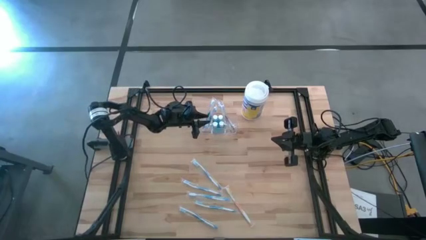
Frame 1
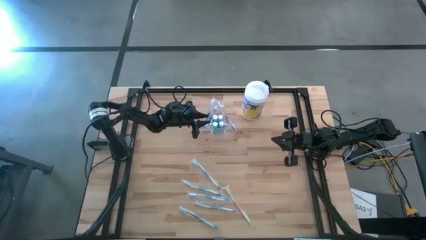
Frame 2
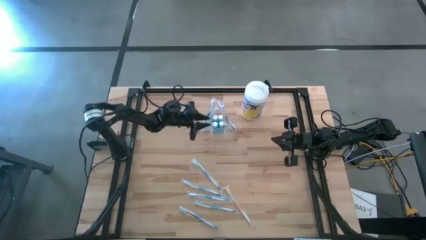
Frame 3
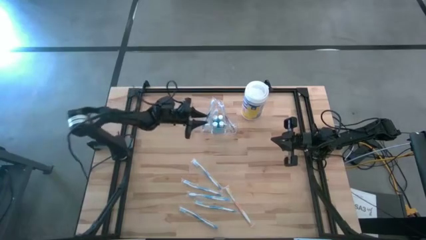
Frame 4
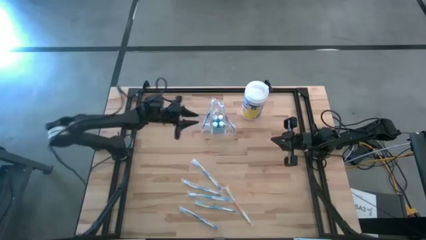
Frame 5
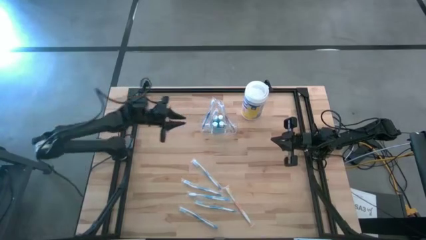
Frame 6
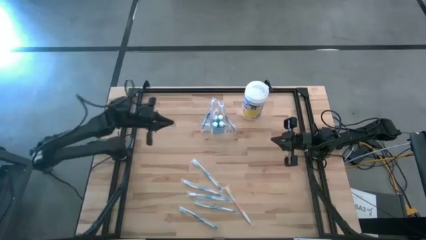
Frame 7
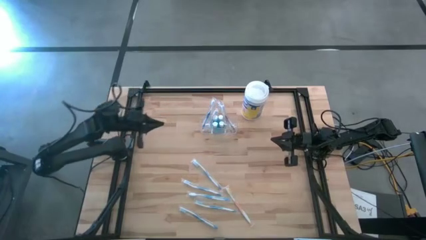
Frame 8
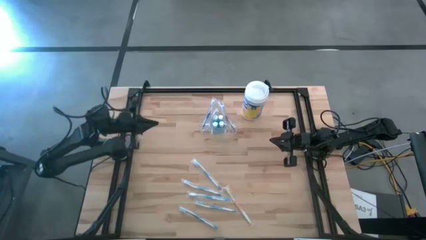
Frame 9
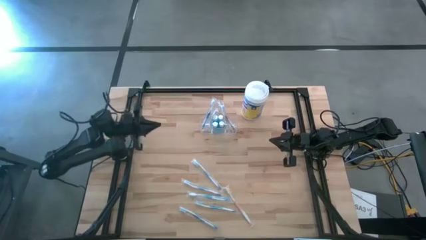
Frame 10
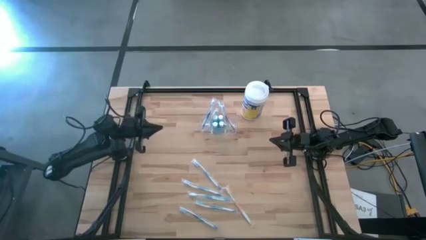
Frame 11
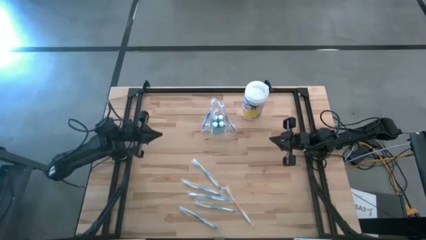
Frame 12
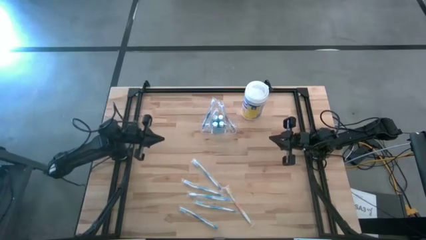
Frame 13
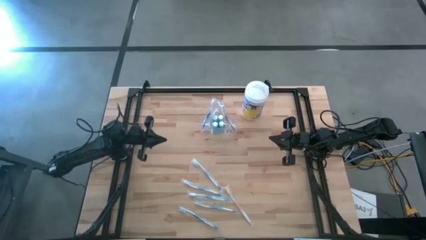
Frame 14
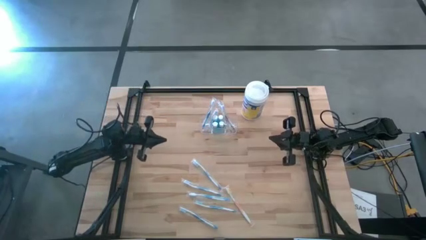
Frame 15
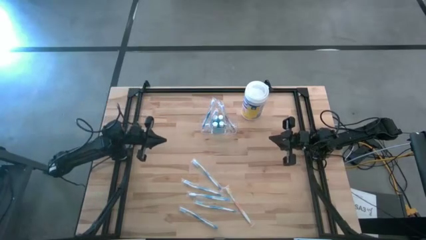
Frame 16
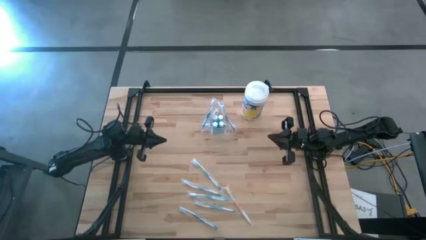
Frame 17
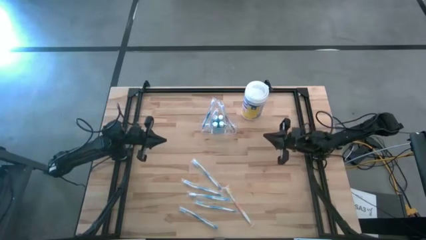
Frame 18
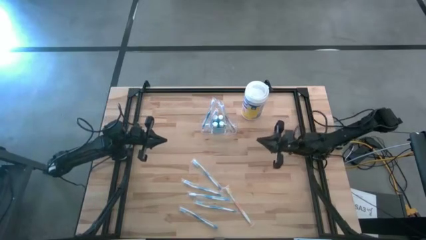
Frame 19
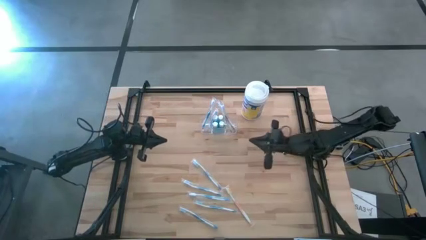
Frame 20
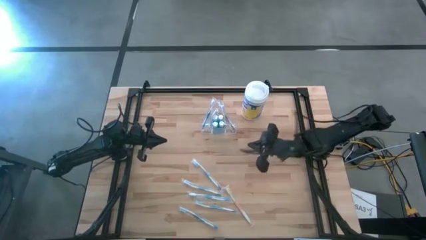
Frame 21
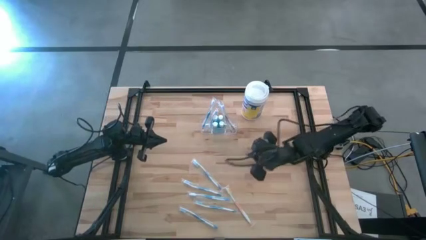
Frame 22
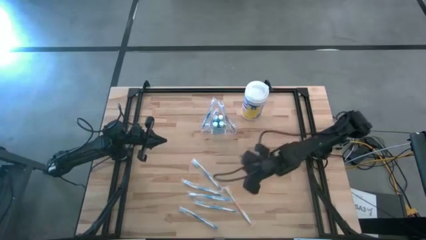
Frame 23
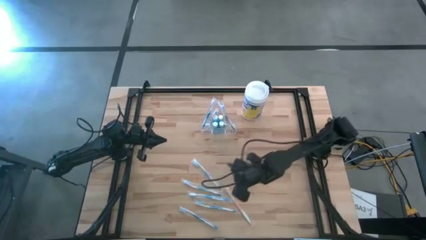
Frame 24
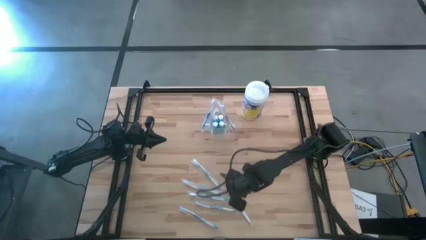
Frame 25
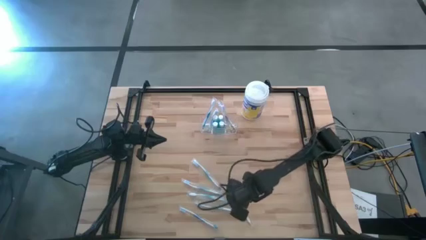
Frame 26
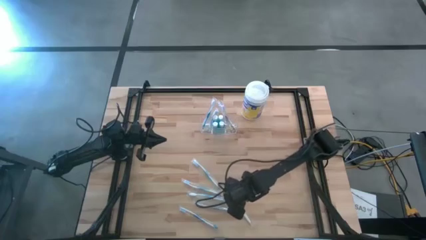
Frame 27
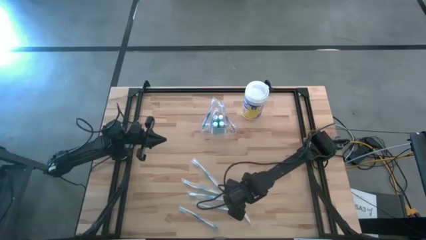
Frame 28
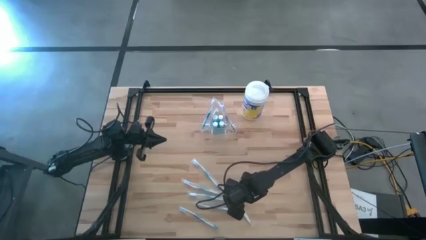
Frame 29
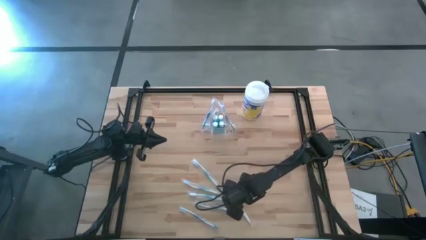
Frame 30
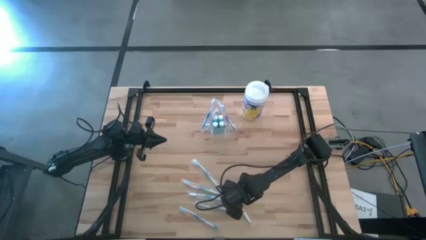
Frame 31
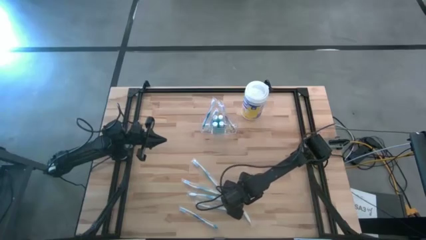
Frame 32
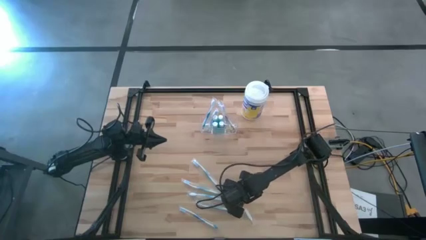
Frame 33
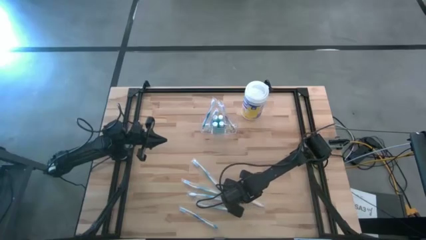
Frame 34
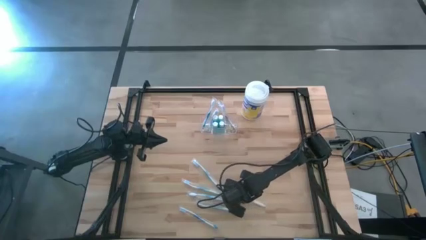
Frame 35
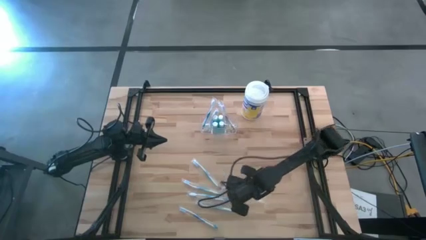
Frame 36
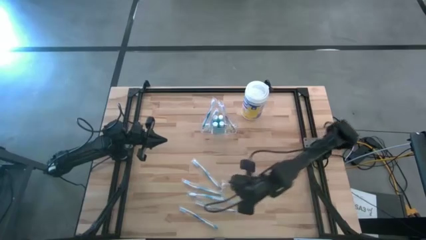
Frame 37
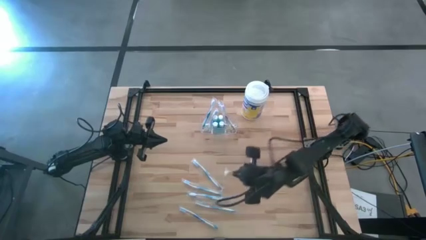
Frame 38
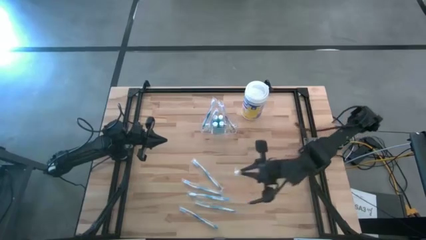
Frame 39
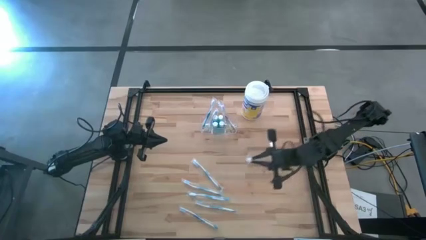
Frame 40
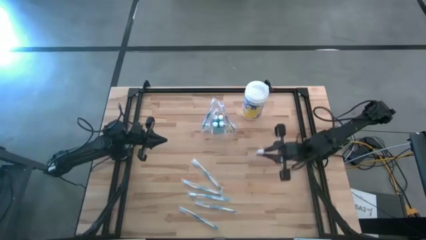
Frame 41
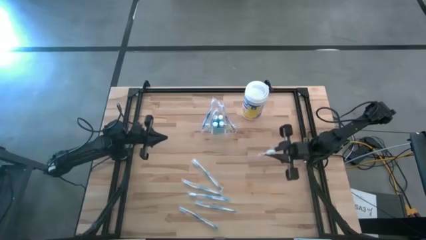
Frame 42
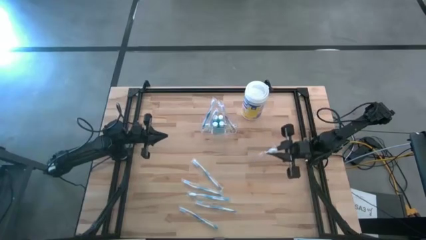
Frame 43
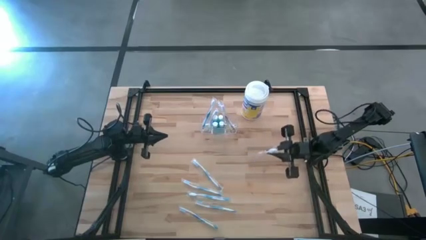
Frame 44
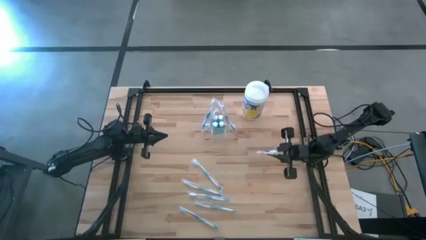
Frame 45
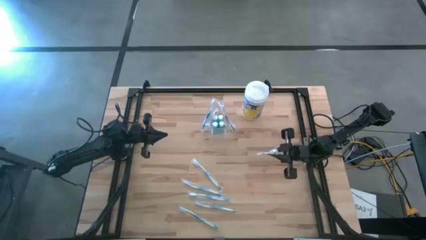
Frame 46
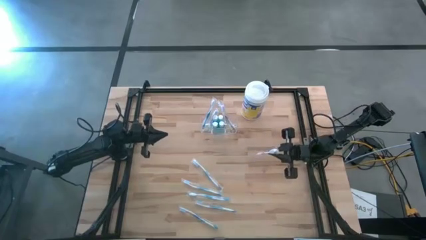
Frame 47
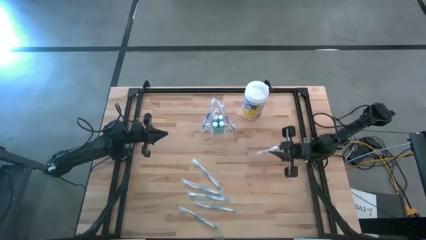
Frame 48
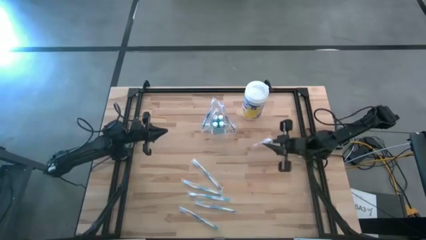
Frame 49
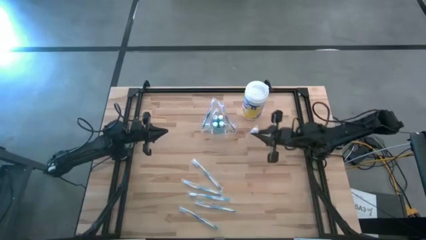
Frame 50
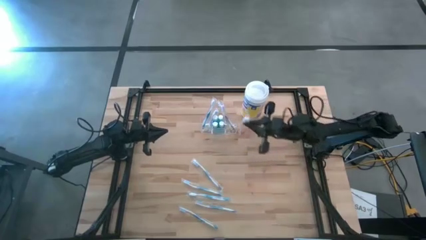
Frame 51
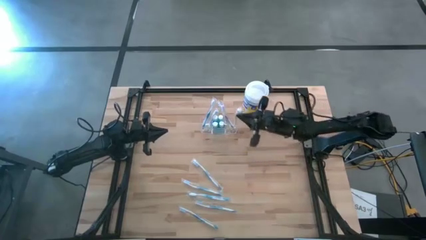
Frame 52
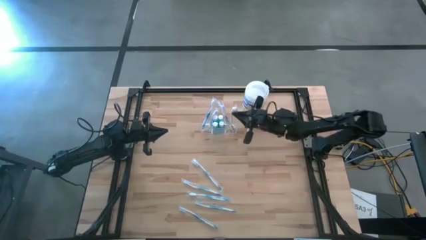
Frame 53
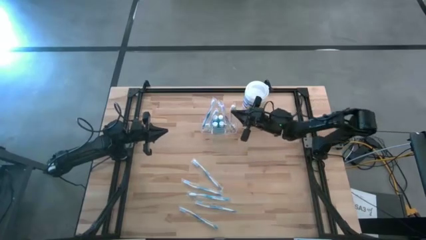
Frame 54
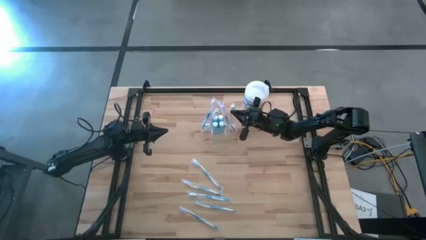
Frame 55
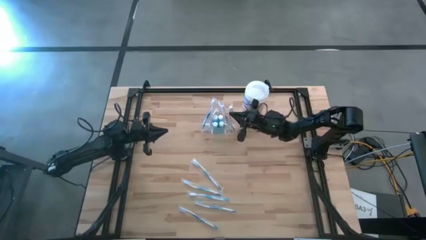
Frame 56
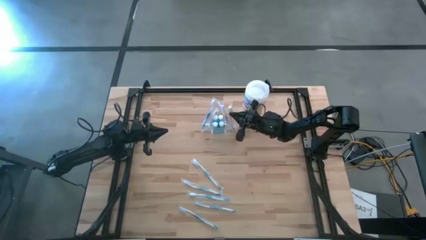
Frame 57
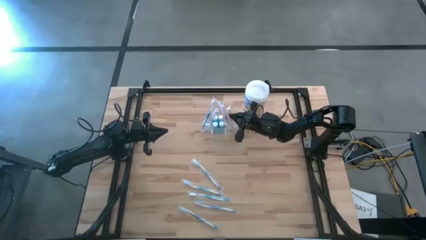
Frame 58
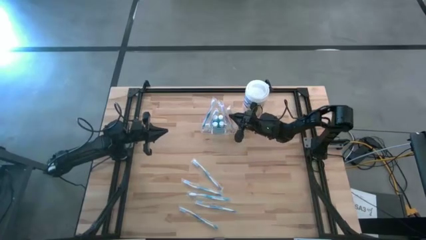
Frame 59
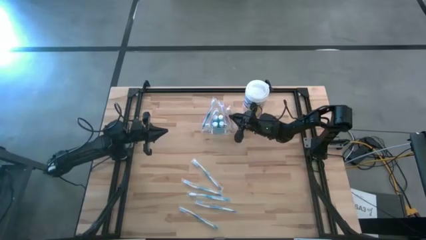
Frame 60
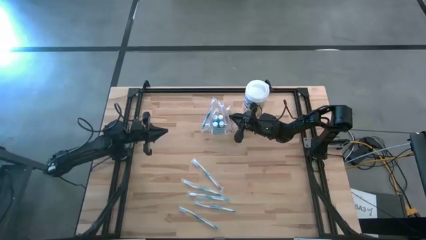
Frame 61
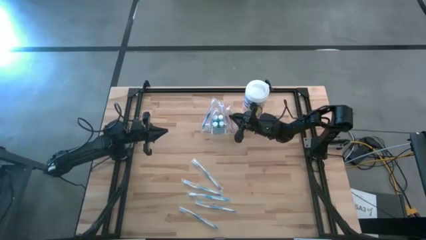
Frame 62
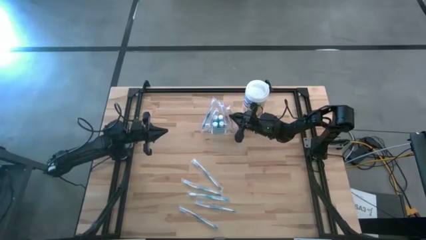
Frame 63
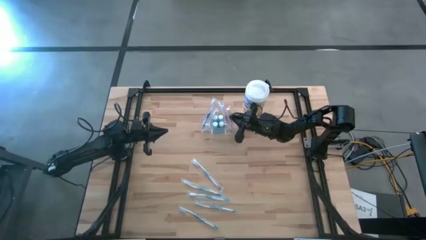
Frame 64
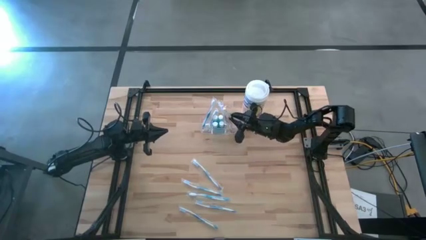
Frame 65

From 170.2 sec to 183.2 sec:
Task: Pick & Place toothbrushing station
Put the yellow toothbrush into the transparent organizer
